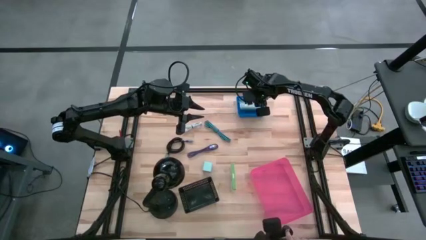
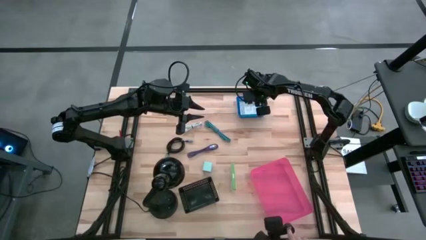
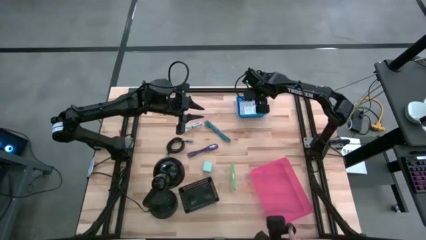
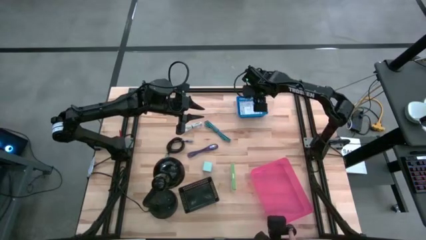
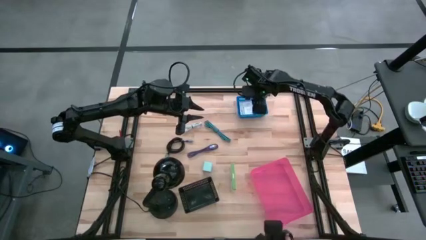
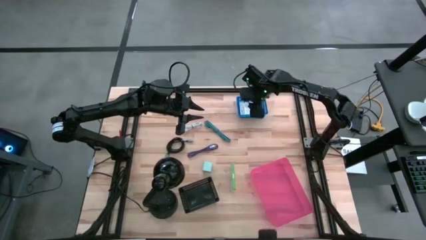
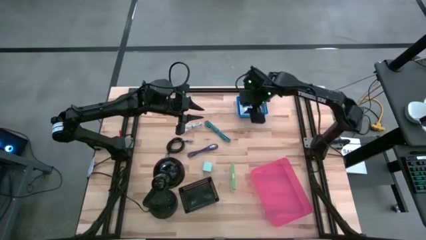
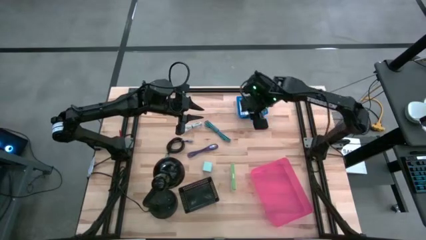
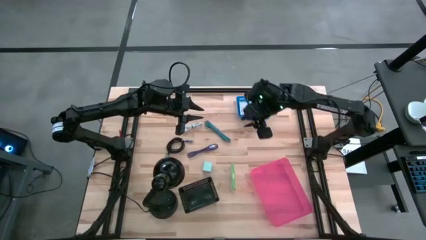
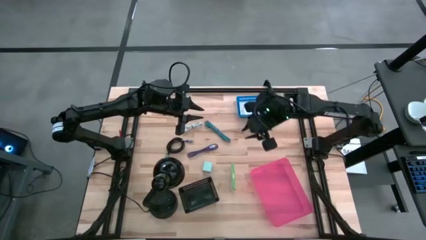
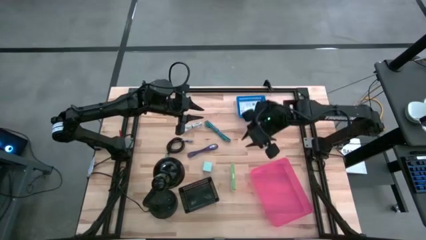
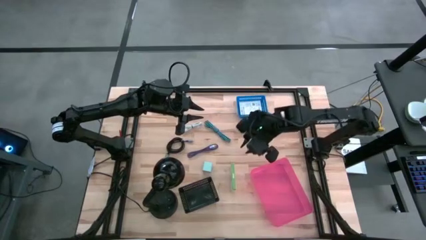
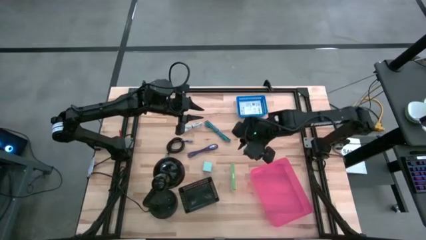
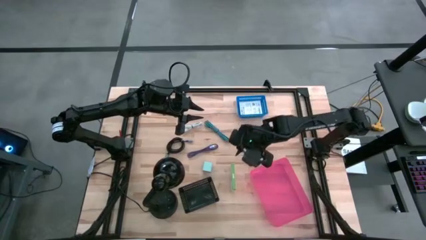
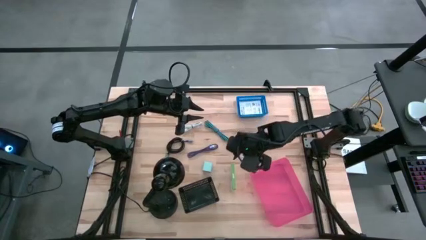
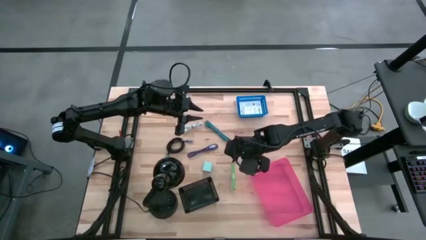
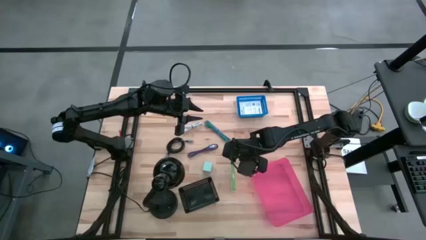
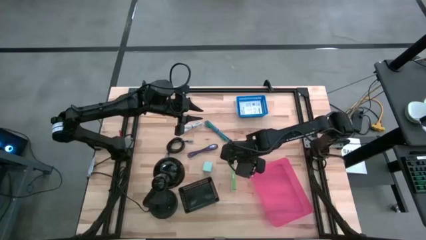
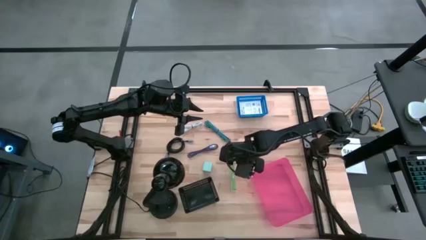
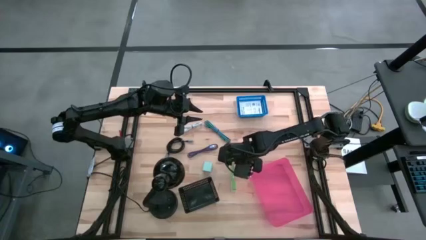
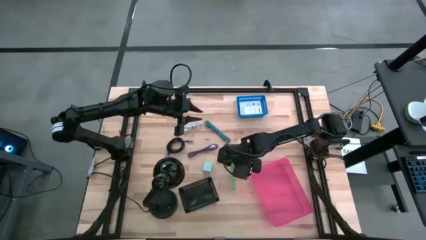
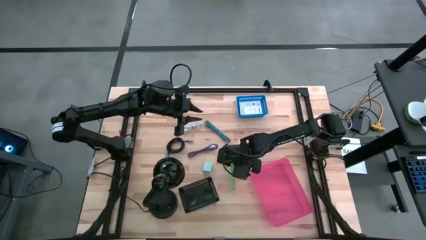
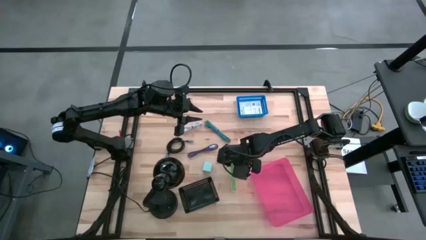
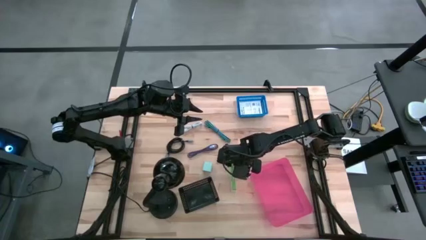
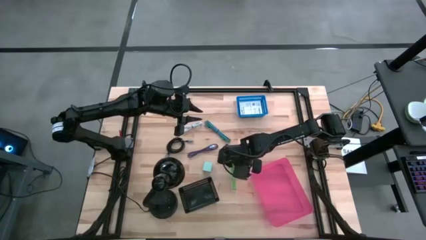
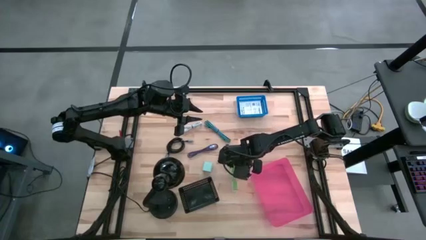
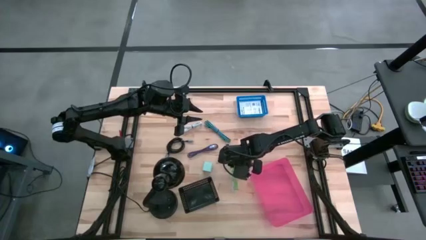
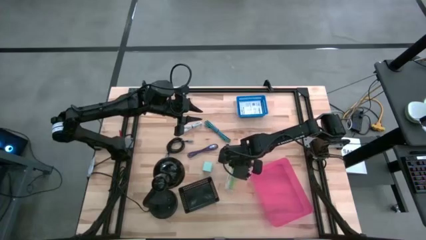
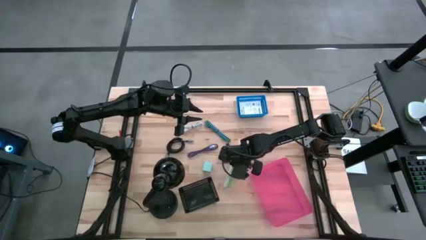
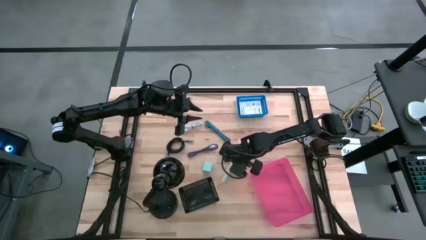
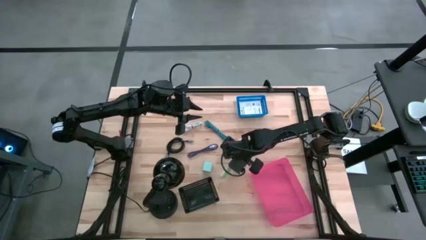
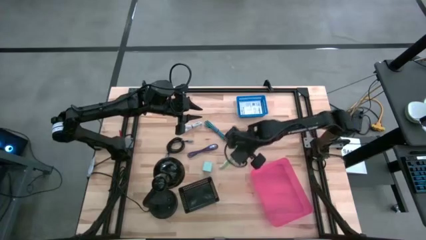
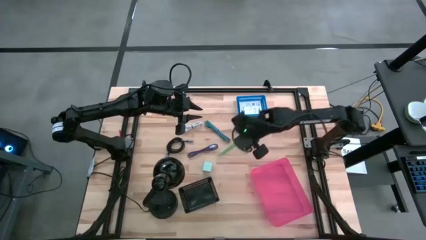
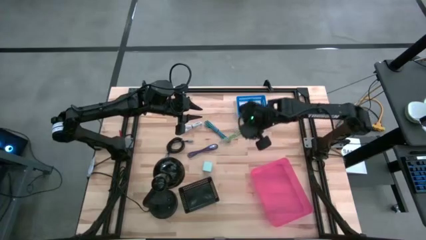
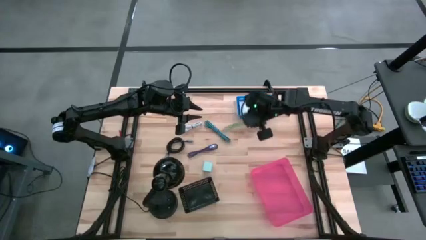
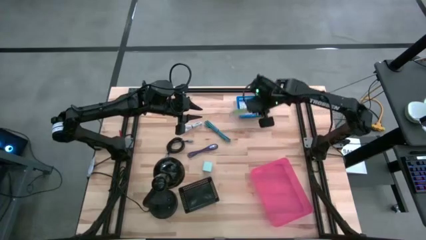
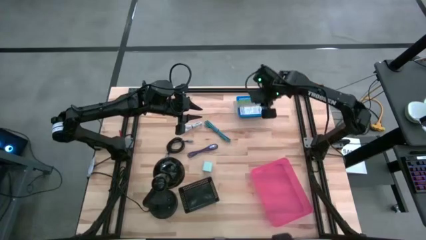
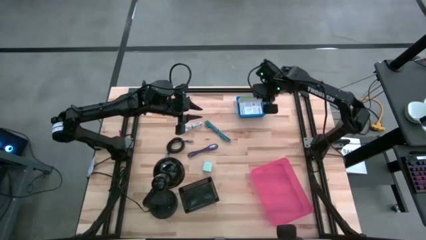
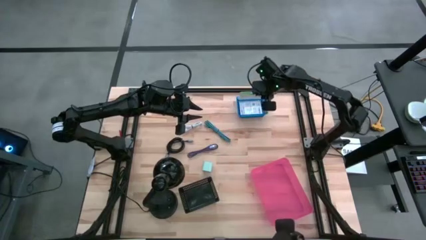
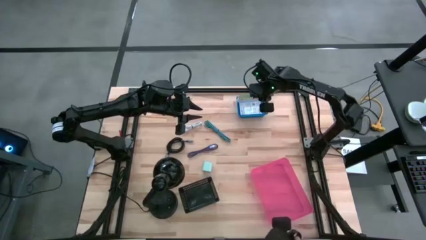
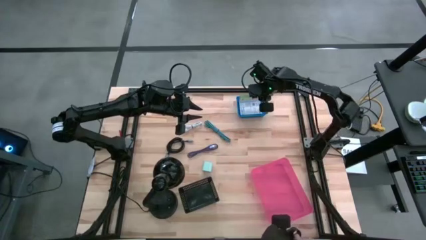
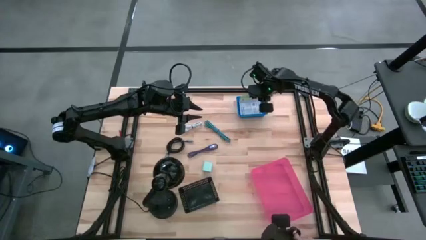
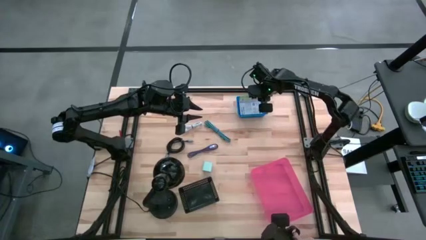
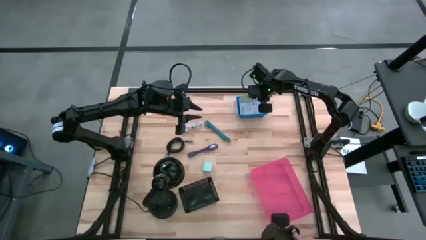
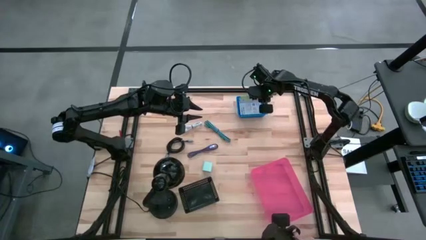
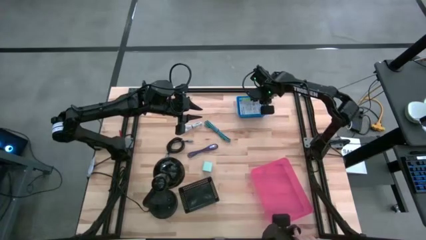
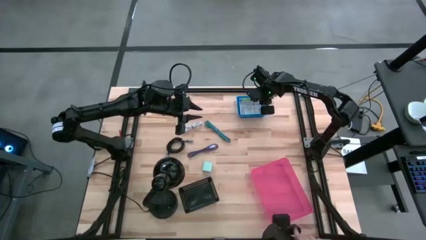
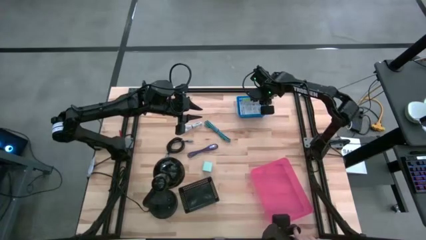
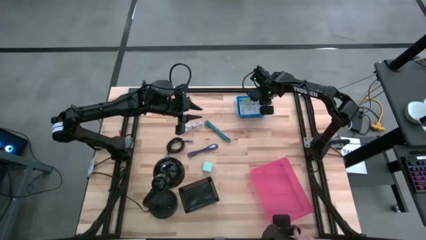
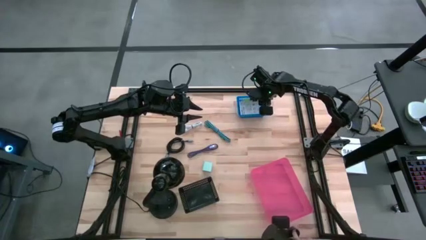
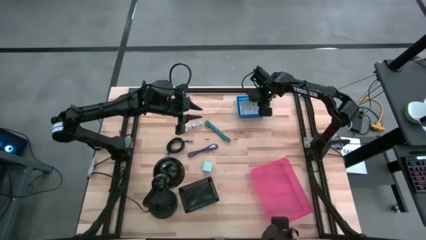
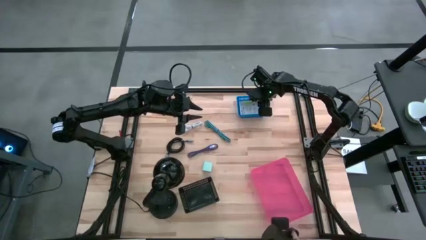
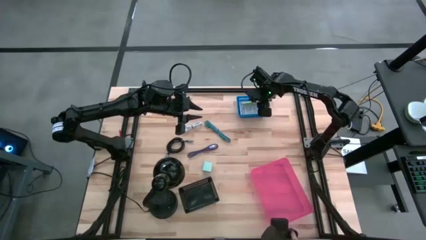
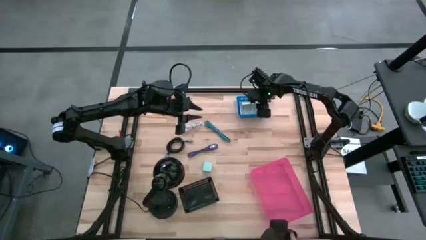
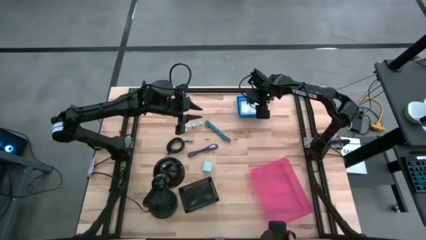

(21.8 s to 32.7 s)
Task: Pick and place items into bin
Put the white card reader box into the blue bin
